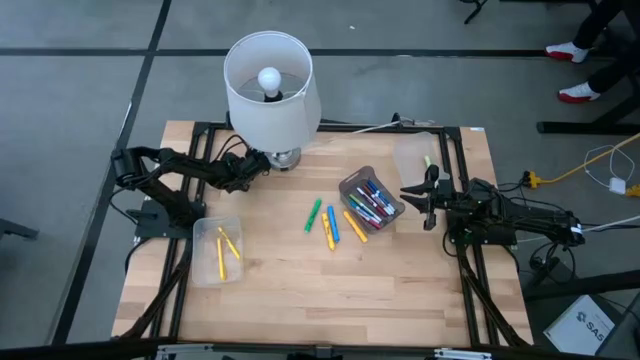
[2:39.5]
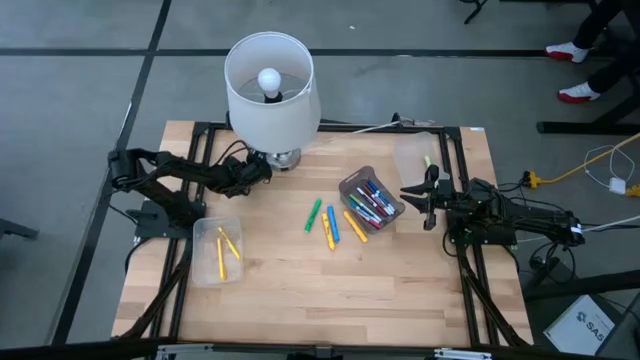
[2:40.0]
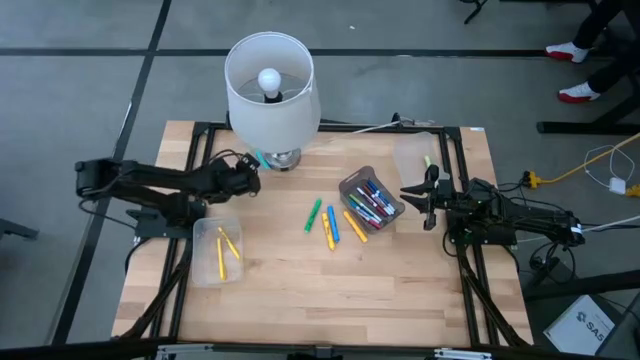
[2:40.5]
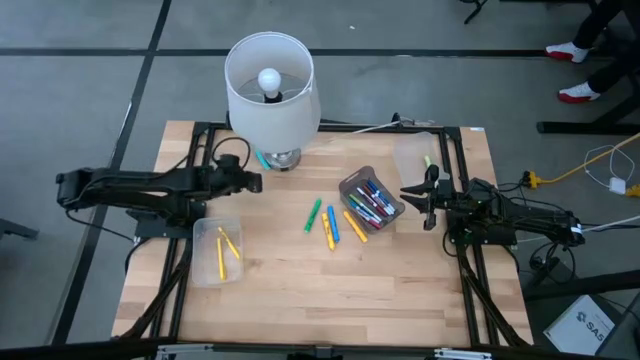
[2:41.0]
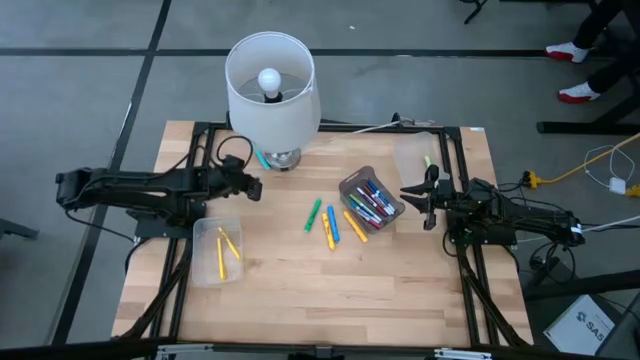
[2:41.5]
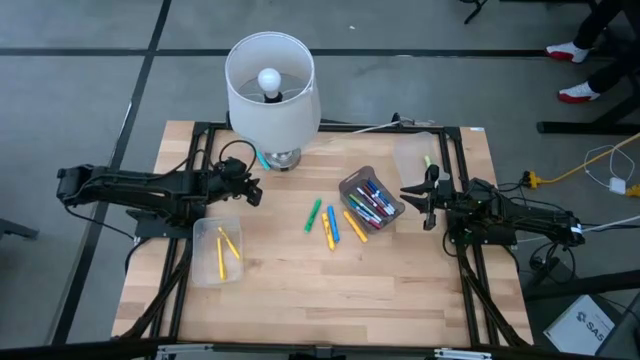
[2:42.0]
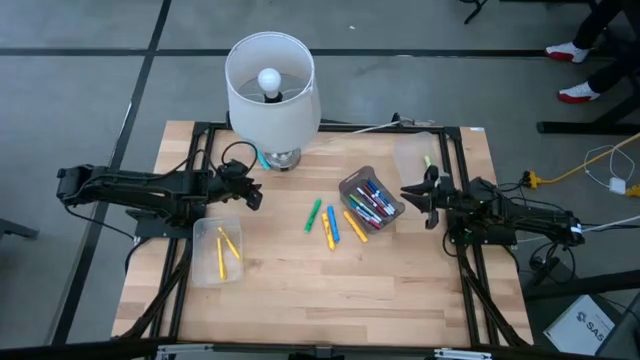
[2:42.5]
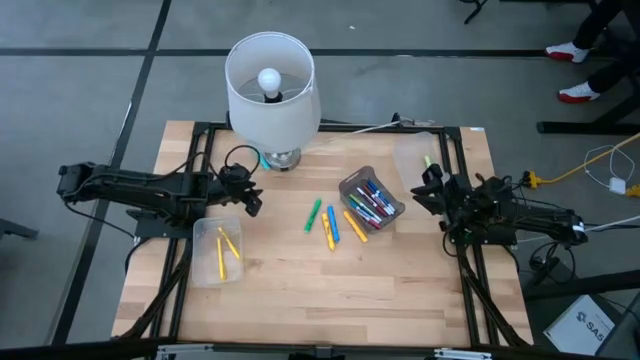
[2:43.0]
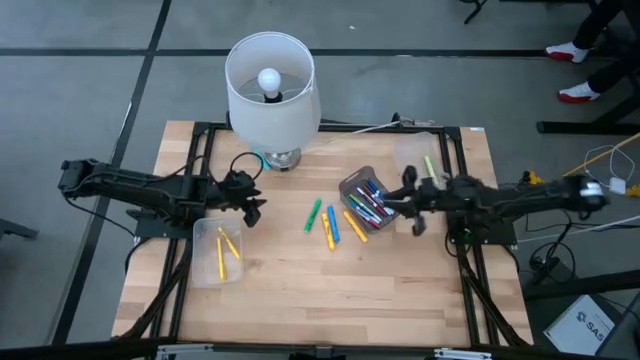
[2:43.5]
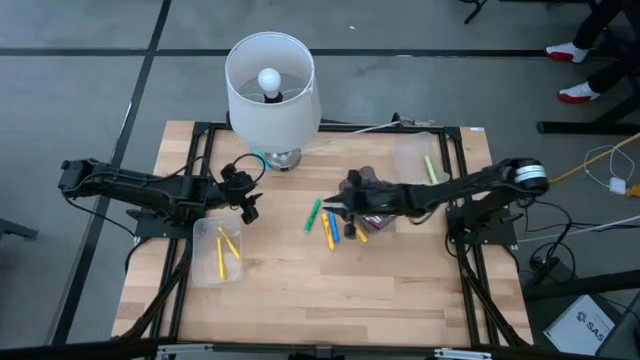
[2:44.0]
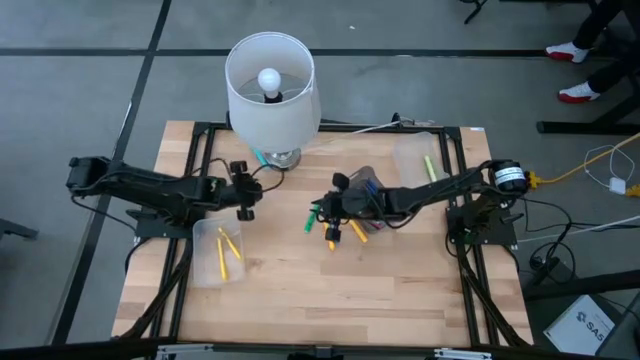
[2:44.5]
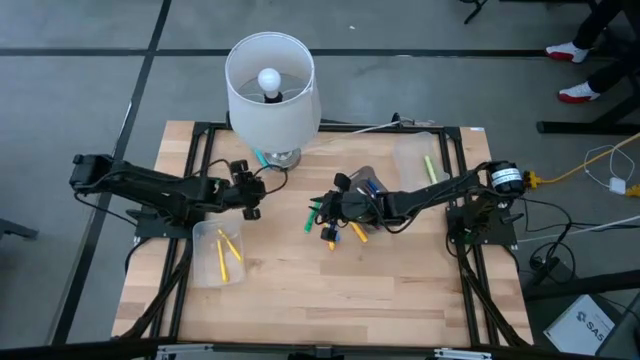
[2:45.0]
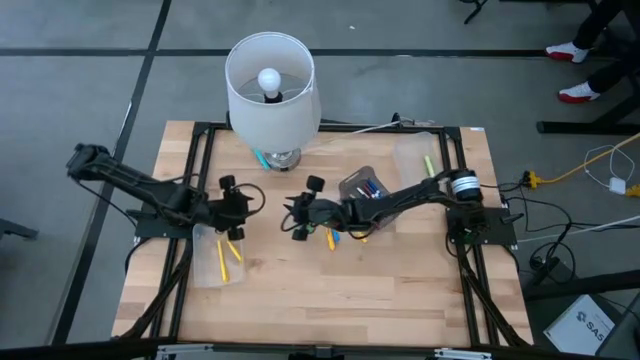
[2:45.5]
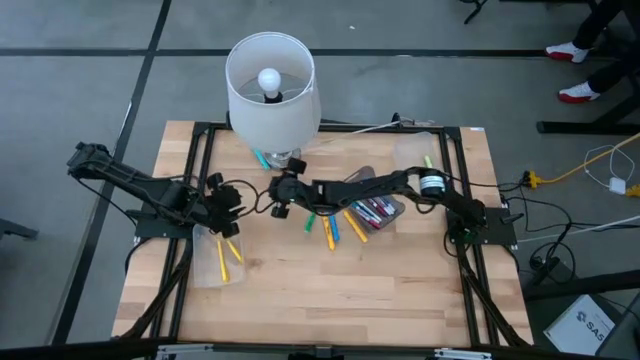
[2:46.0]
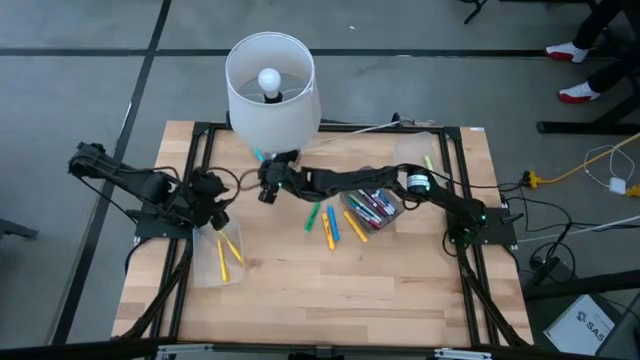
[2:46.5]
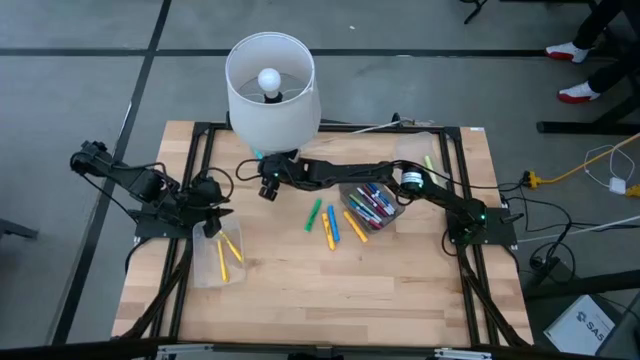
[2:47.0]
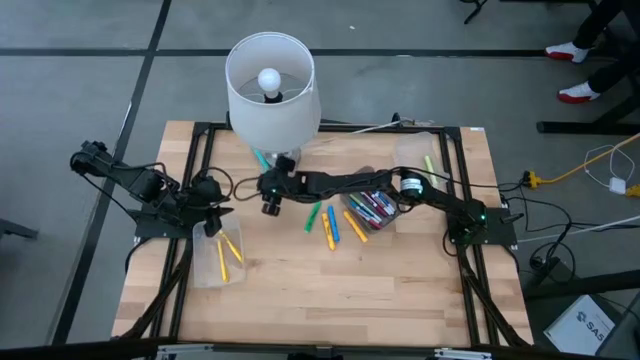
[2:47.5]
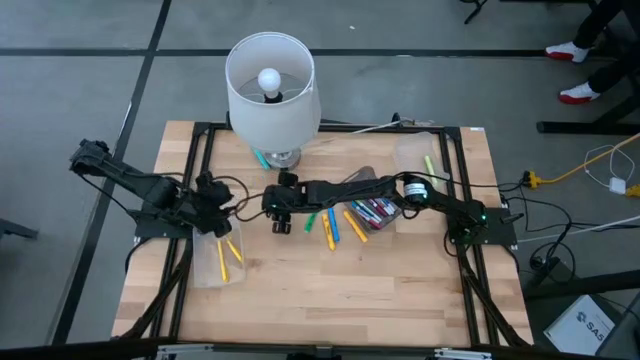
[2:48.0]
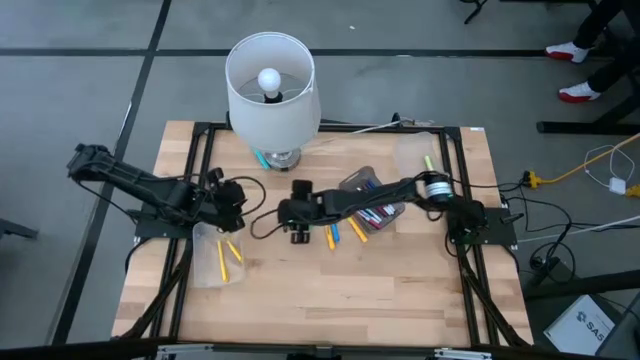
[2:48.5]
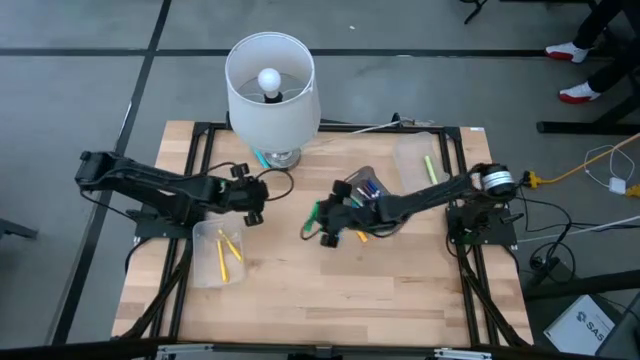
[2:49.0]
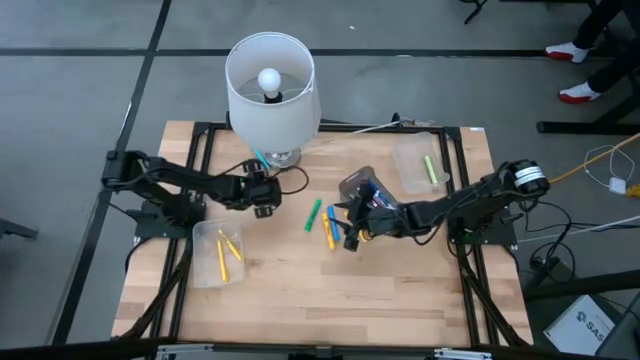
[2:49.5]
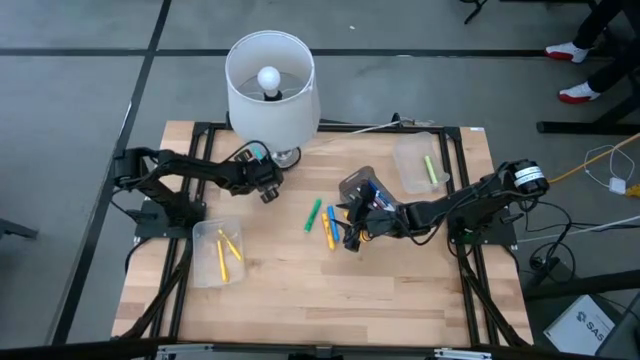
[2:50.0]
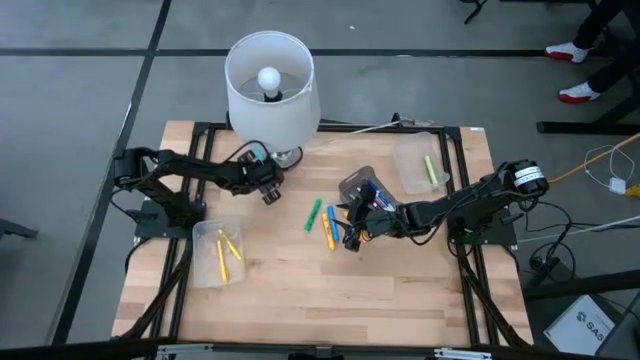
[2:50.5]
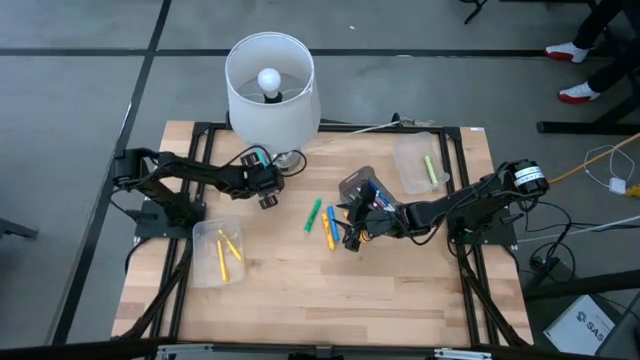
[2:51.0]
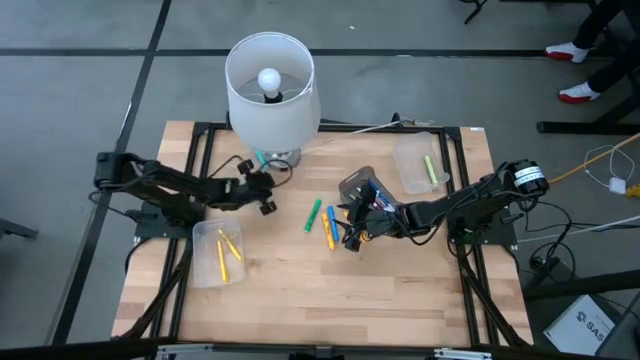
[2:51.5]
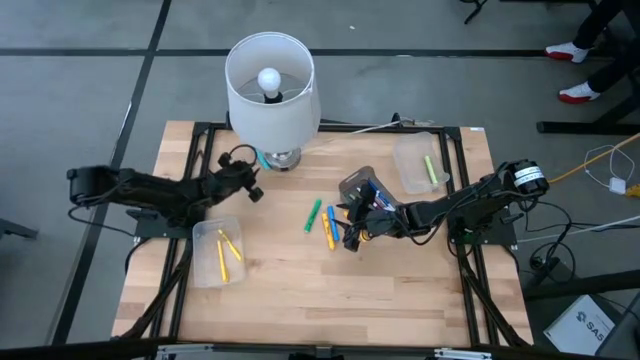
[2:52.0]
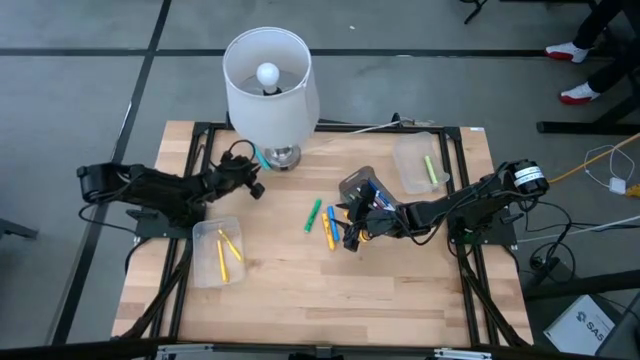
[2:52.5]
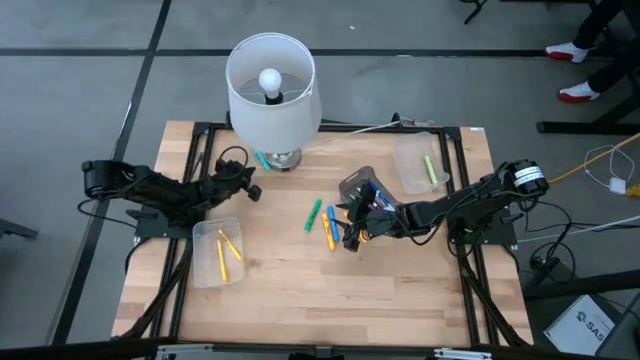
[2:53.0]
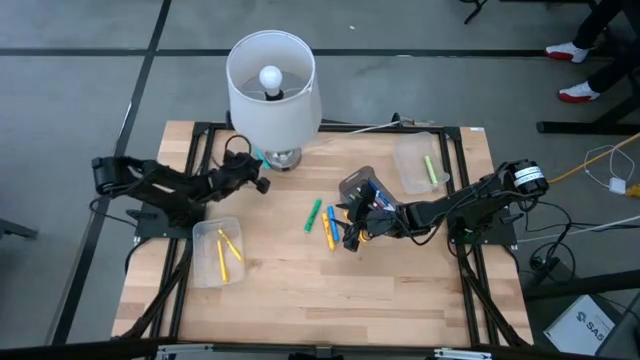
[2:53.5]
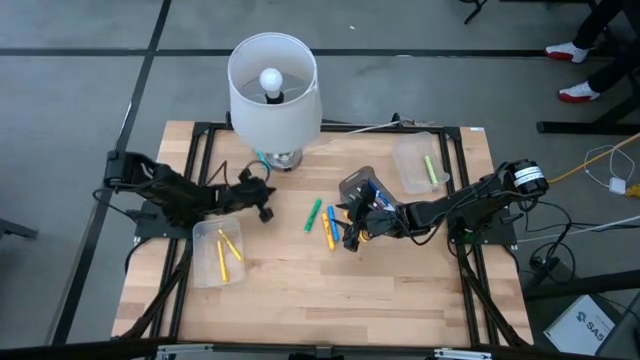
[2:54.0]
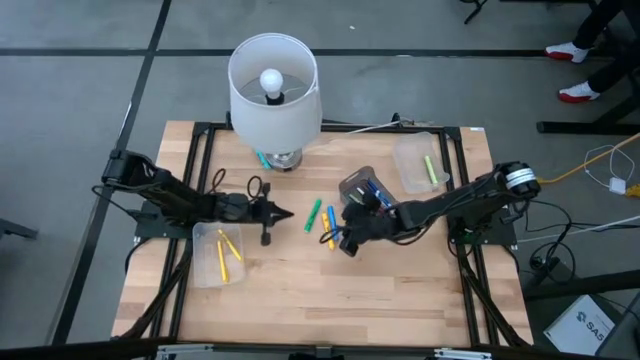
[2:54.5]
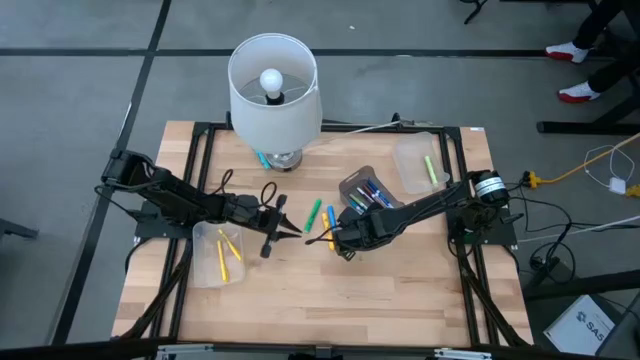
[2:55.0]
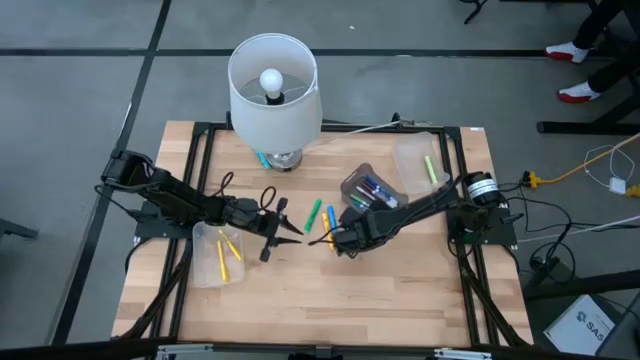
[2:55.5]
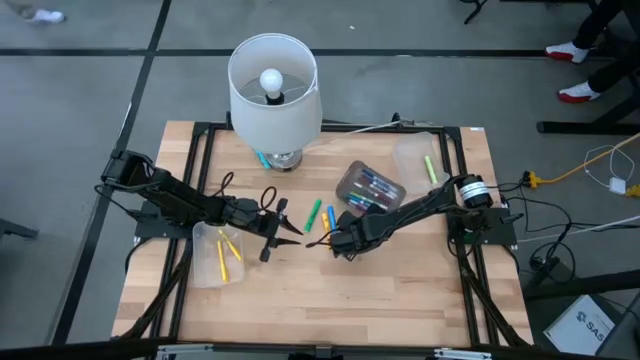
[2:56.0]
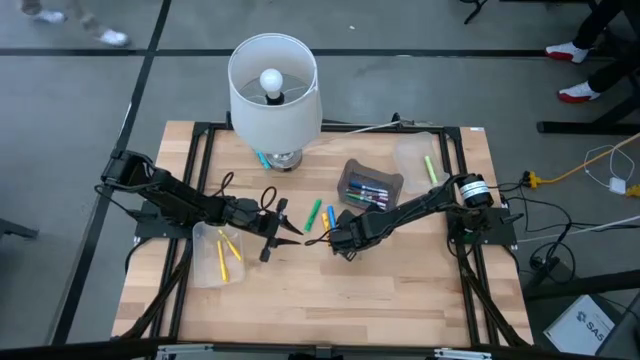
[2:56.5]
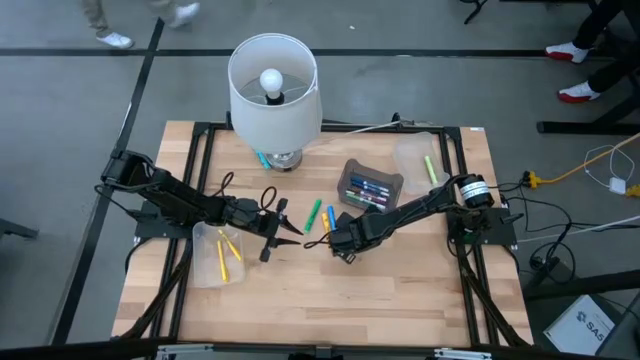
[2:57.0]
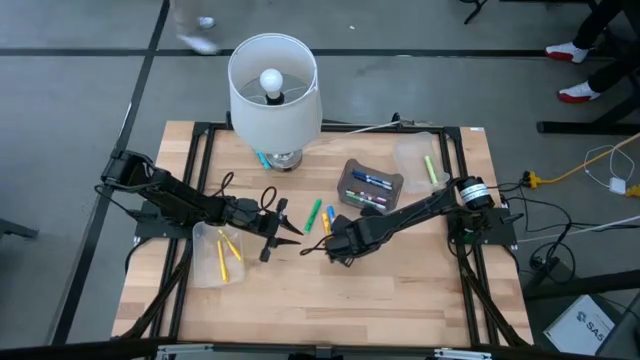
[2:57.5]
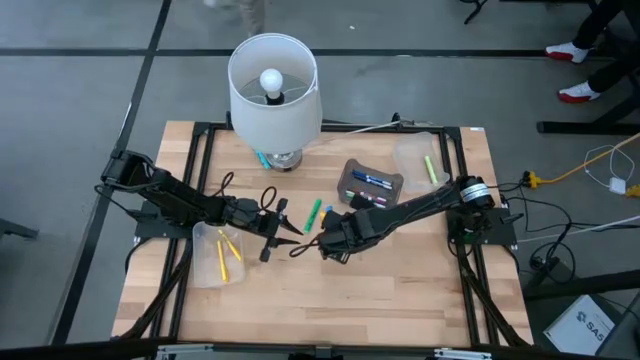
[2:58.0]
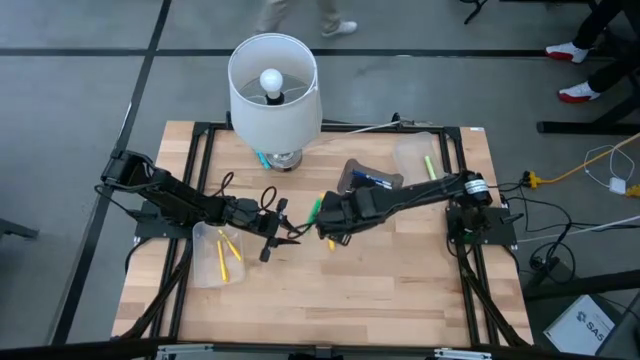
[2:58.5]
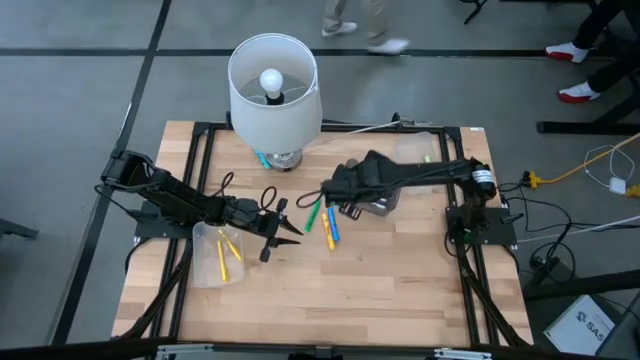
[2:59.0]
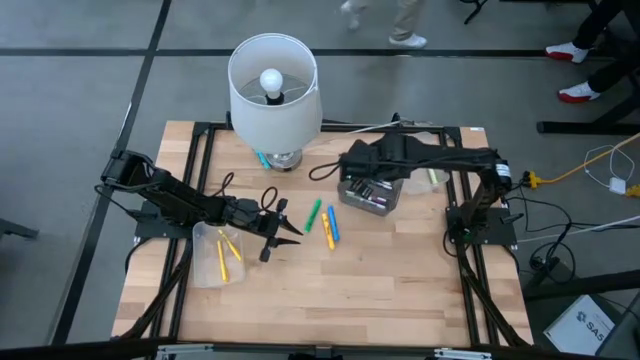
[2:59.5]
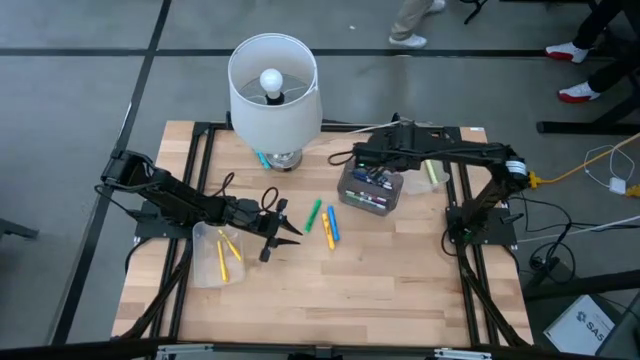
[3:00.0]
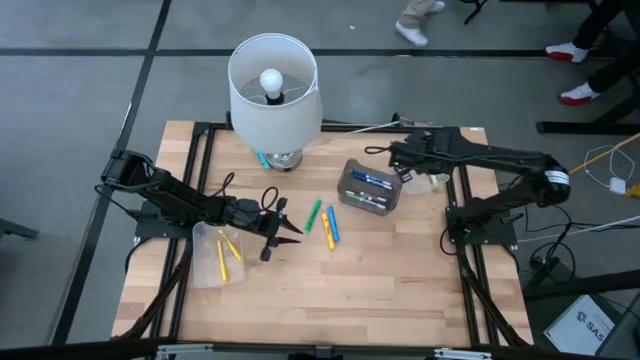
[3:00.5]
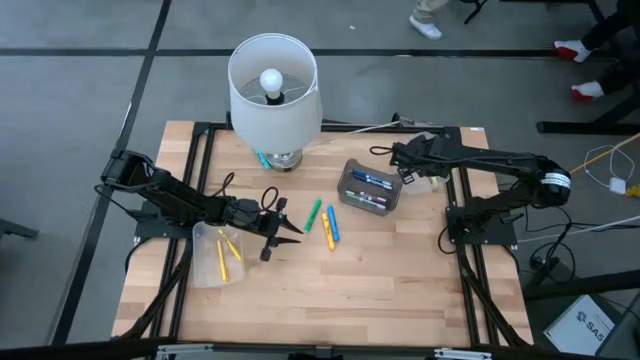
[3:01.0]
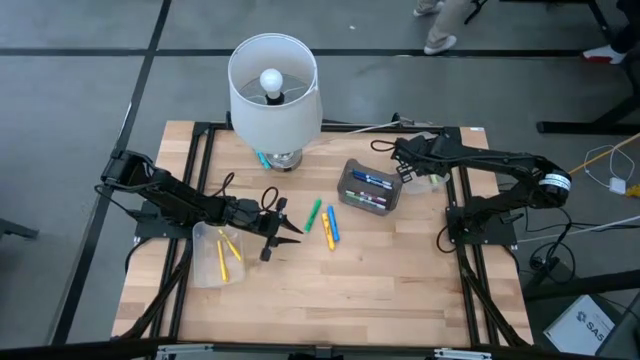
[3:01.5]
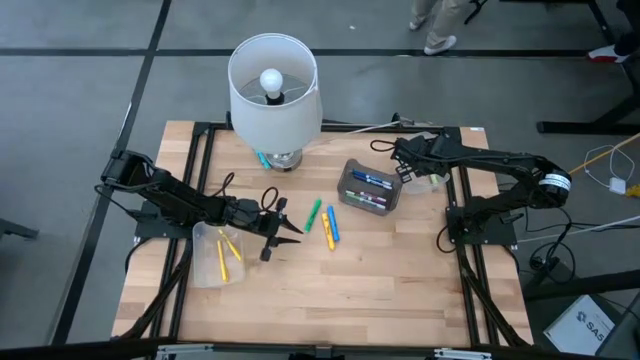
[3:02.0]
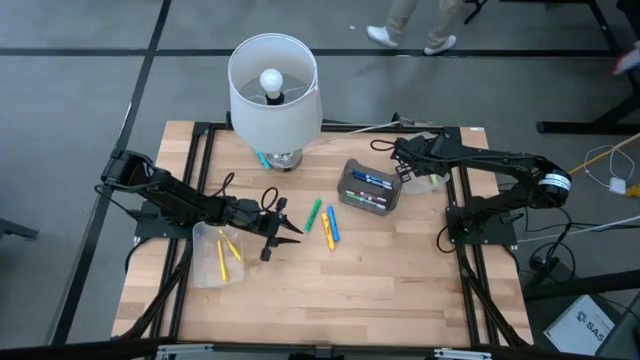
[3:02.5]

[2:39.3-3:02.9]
Task: Pick & Place Markers
Put the yellow highlighter pen into the right transparent bin
